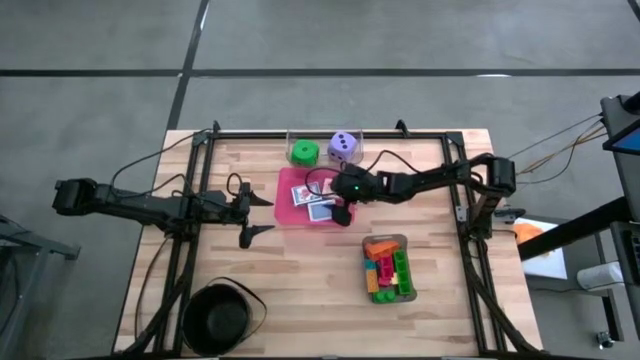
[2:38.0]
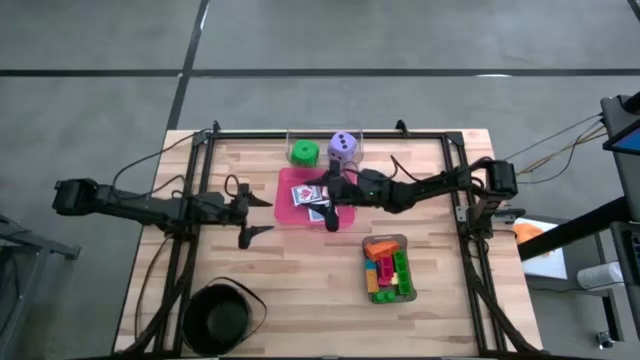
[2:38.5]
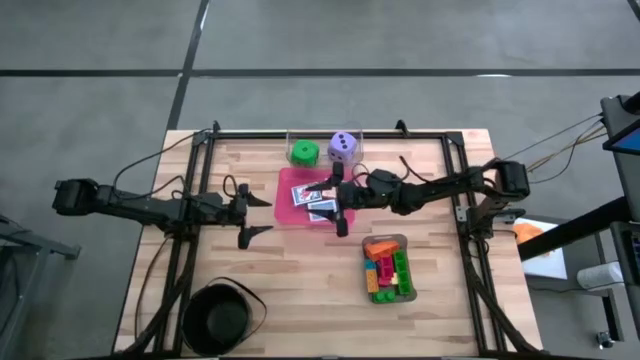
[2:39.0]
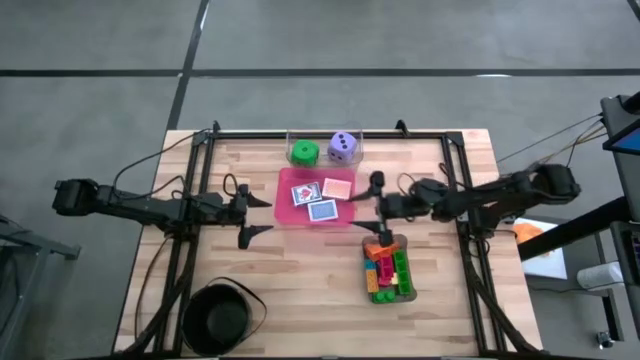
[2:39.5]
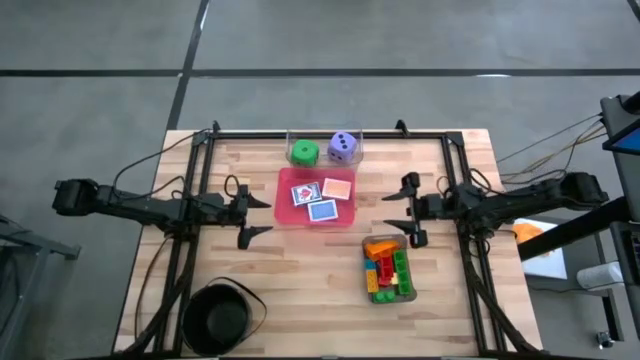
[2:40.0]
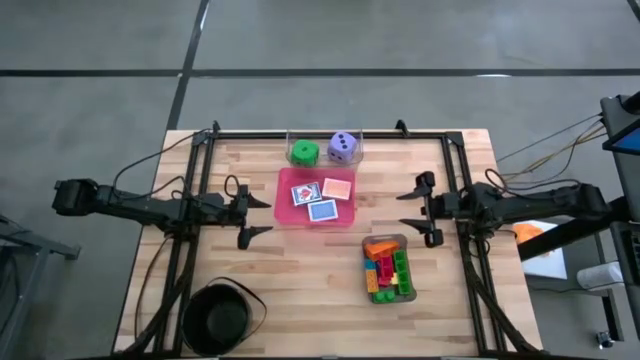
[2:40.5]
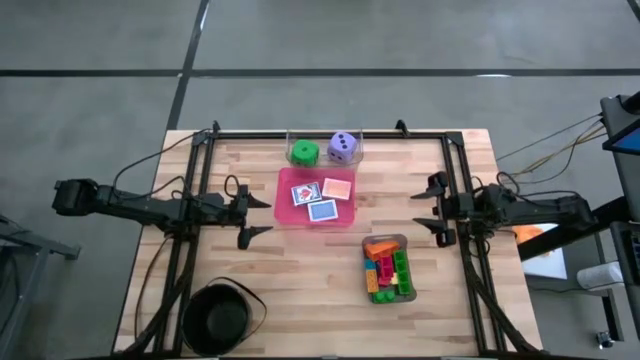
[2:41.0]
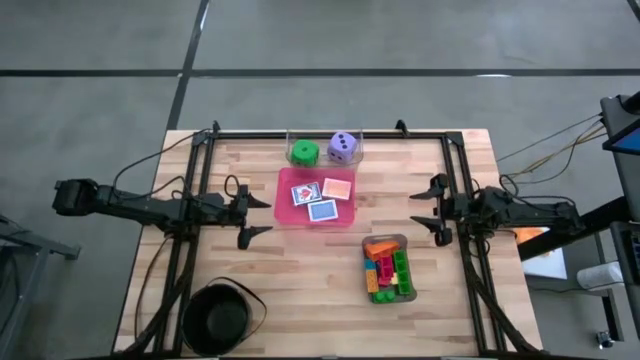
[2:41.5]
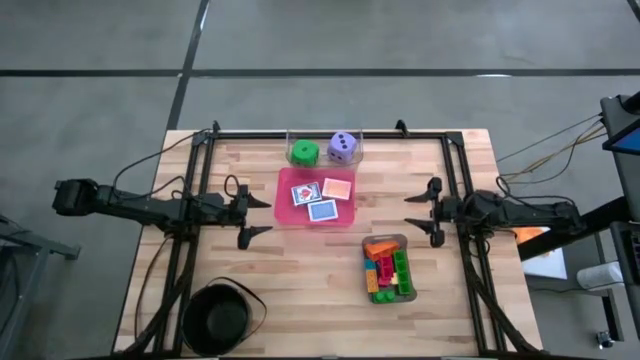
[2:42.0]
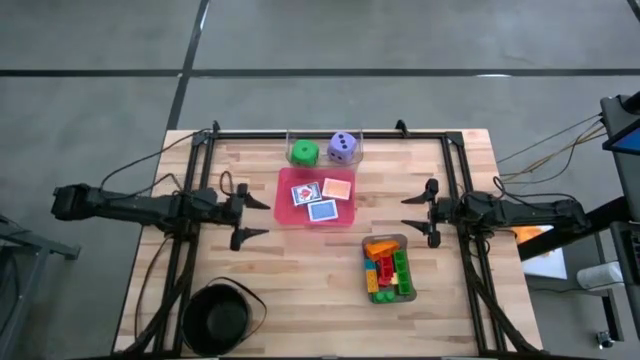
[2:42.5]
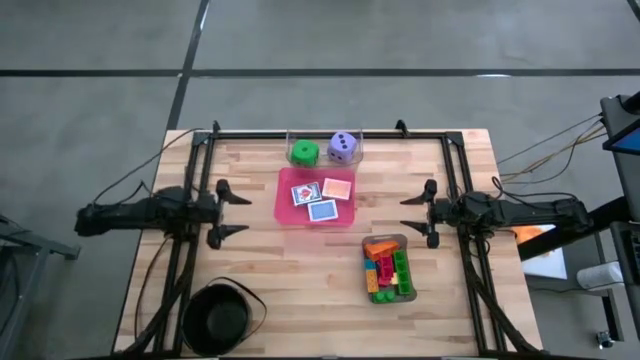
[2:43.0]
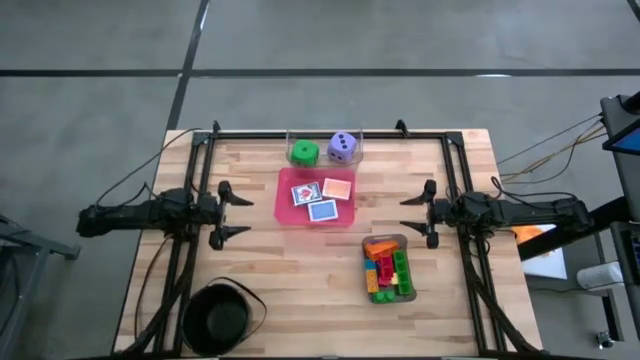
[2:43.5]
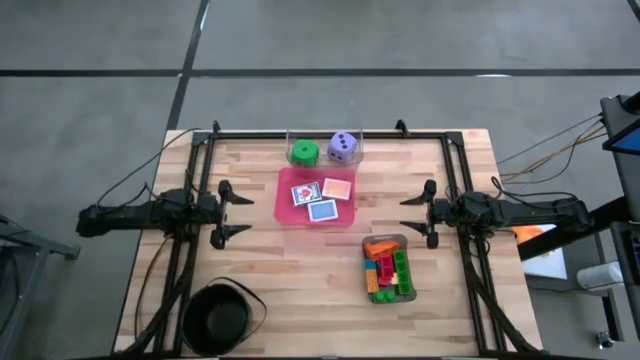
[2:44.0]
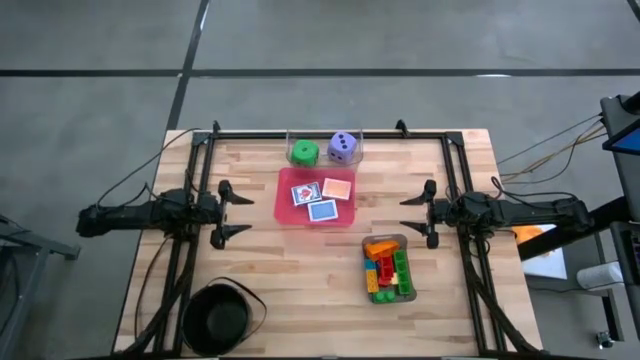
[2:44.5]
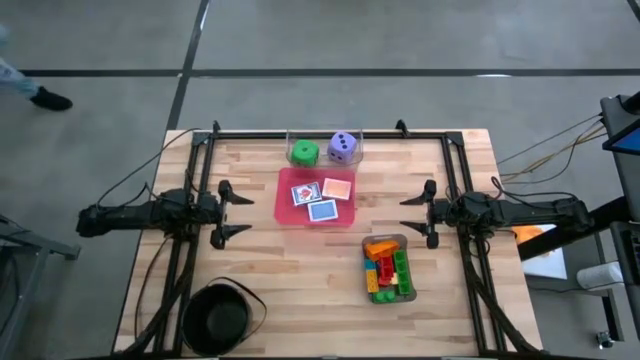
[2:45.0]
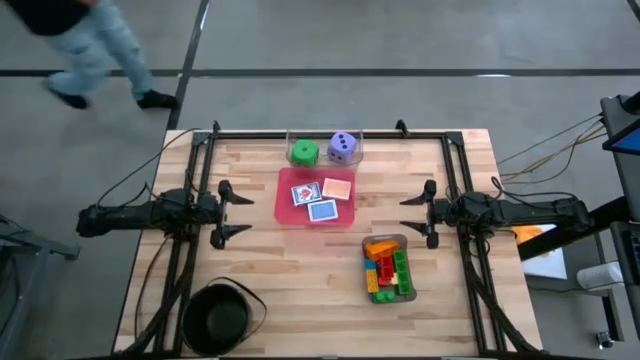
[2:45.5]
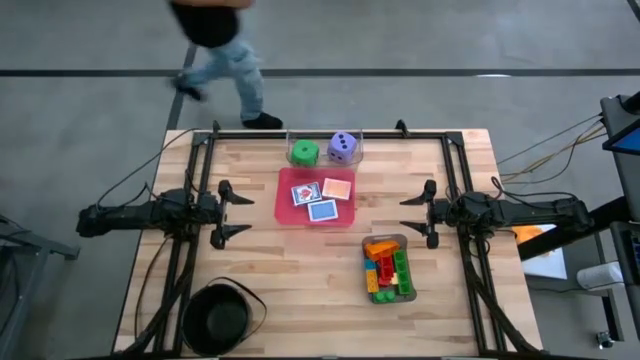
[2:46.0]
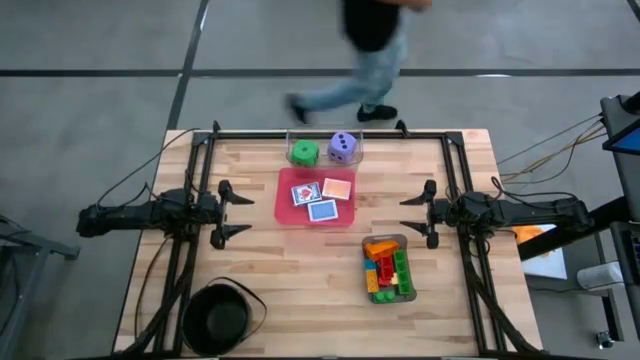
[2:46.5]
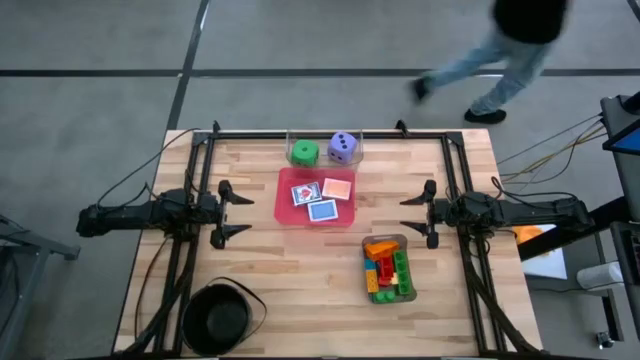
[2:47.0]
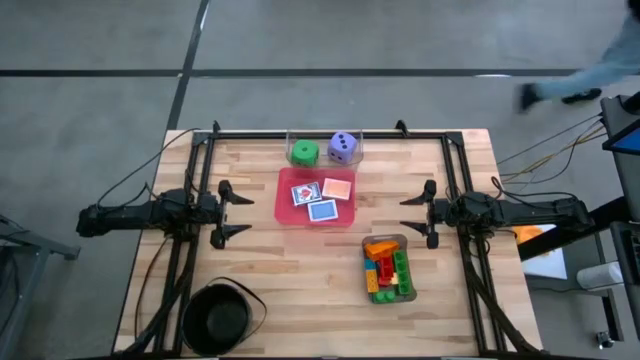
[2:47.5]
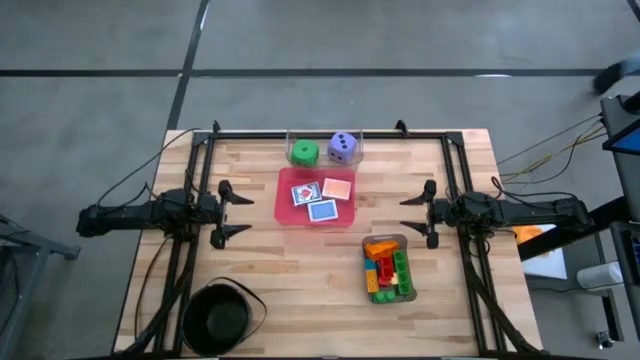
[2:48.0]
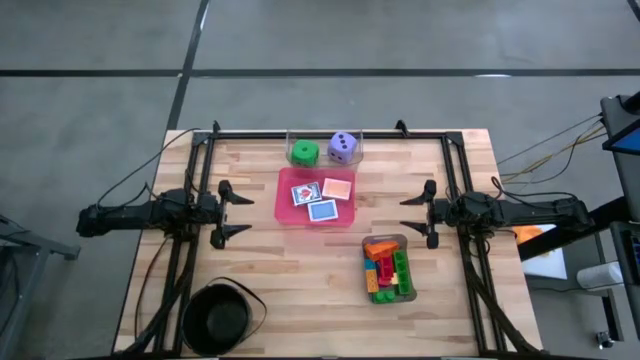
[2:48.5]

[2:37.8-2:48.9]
Task: Pick & Place Toys
Return to Home Position

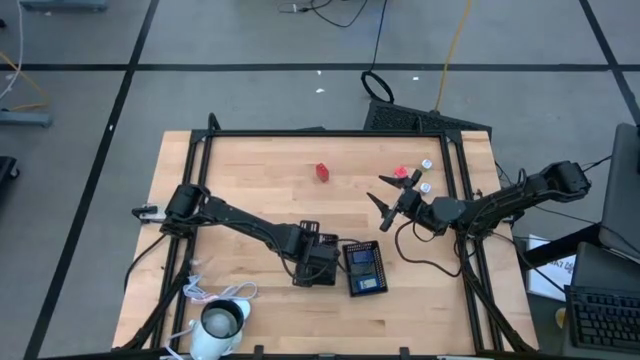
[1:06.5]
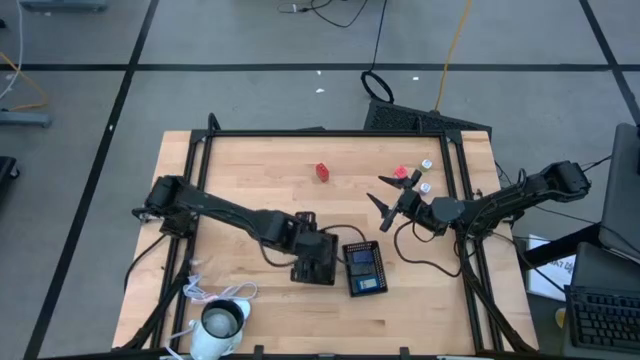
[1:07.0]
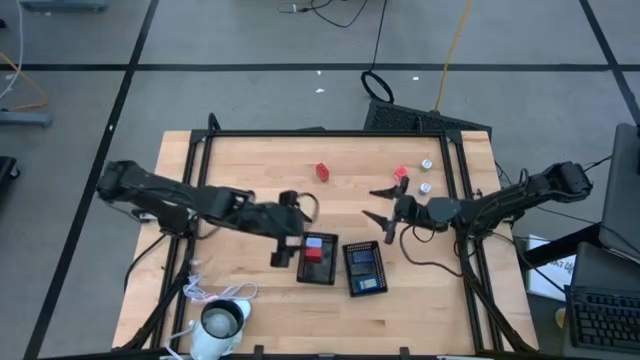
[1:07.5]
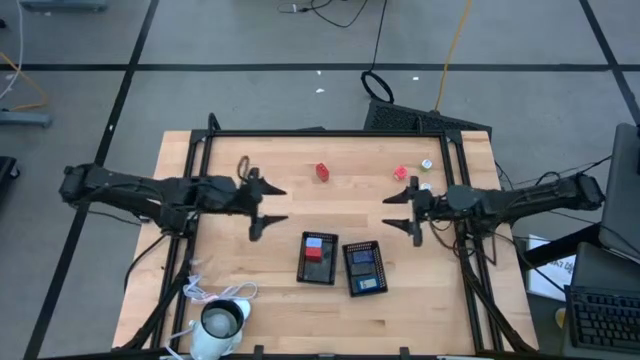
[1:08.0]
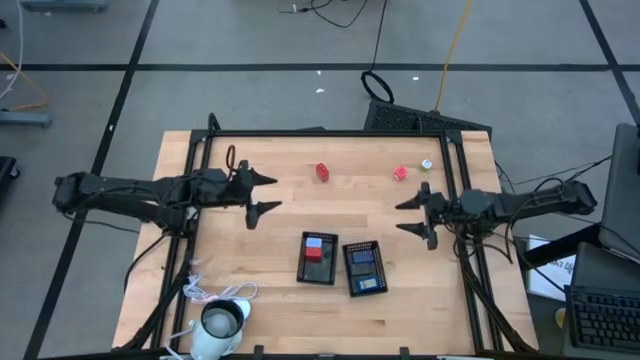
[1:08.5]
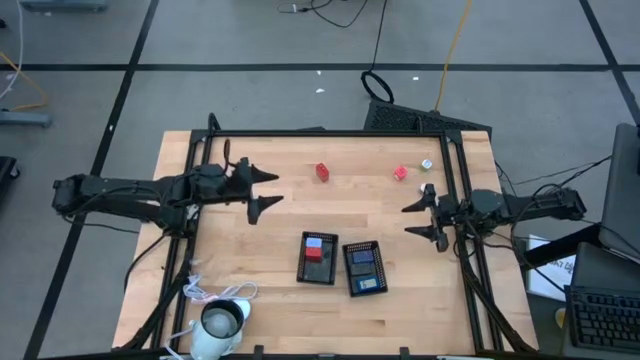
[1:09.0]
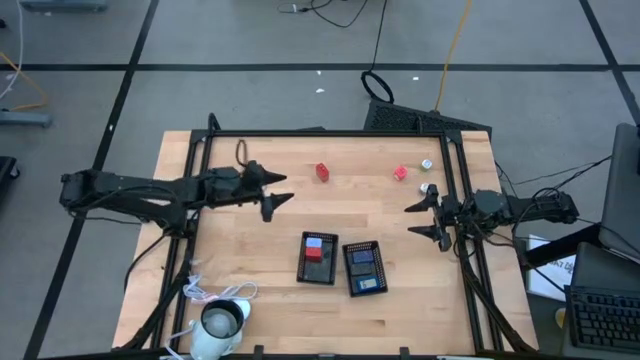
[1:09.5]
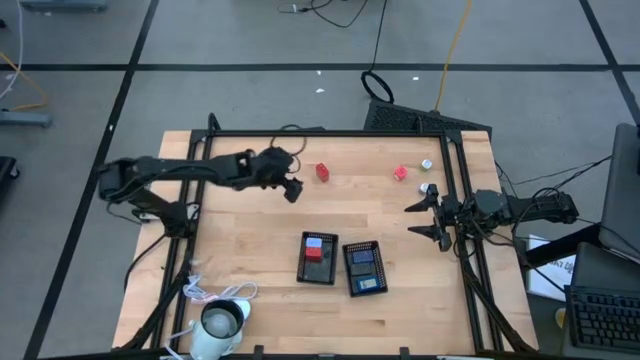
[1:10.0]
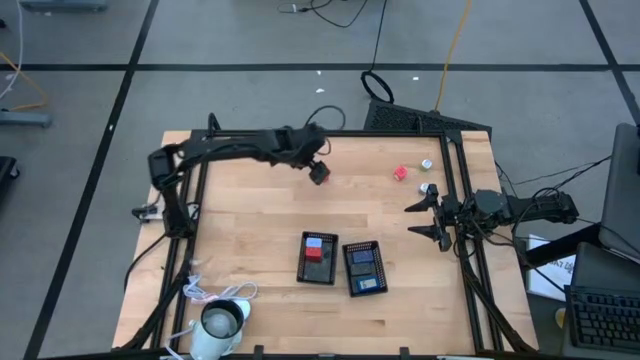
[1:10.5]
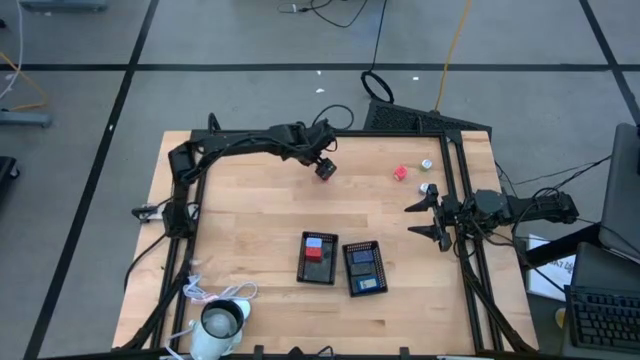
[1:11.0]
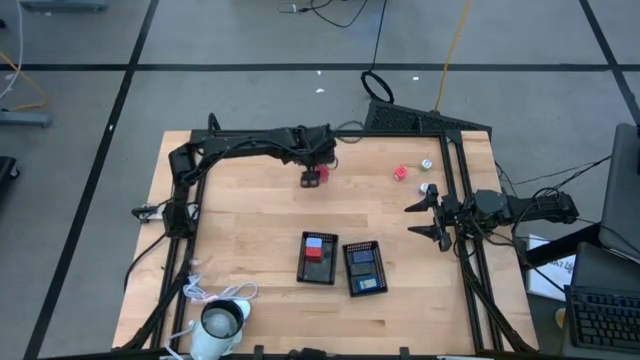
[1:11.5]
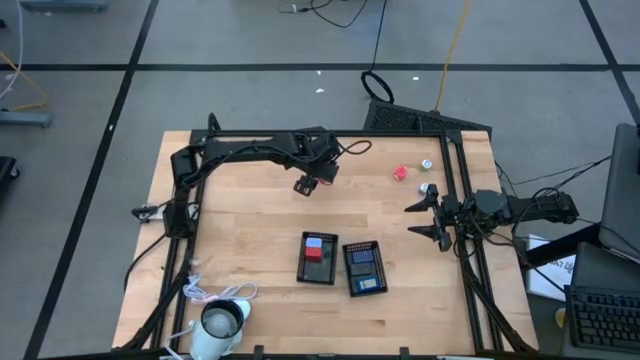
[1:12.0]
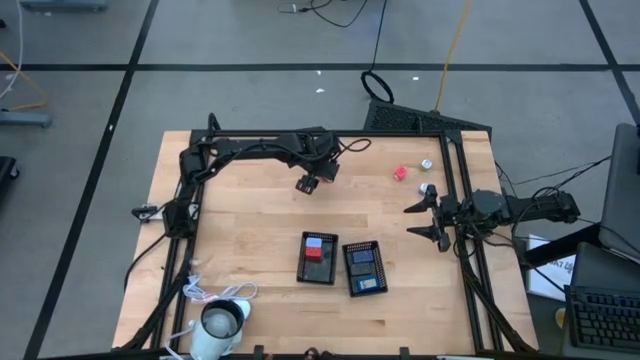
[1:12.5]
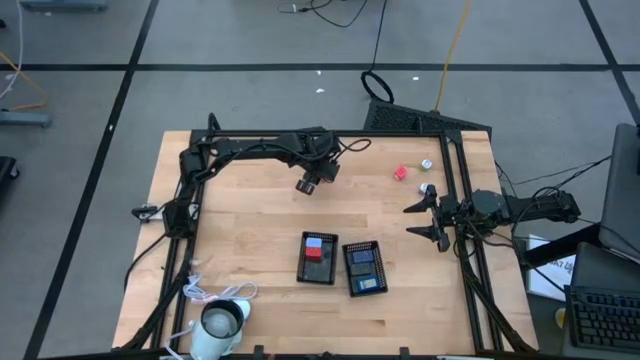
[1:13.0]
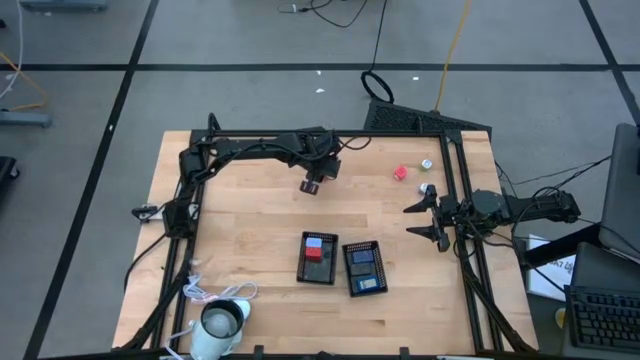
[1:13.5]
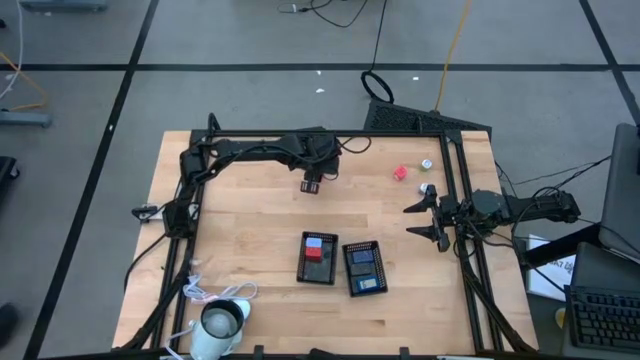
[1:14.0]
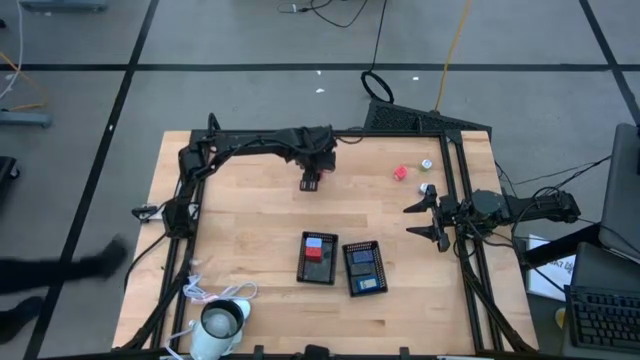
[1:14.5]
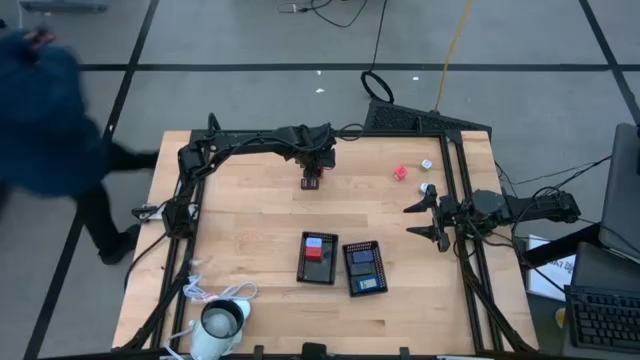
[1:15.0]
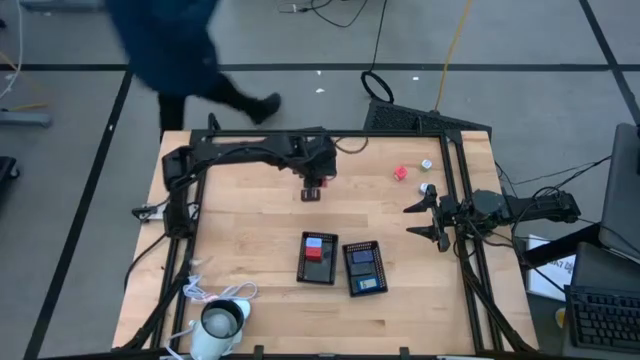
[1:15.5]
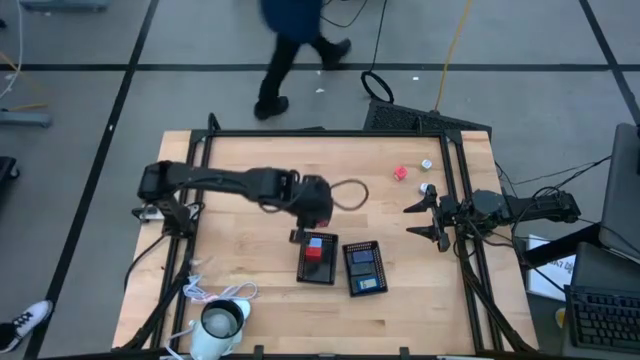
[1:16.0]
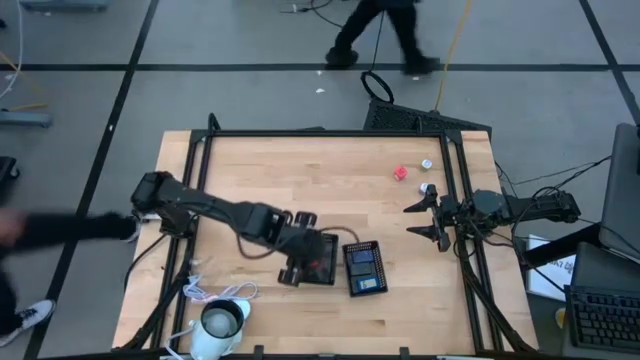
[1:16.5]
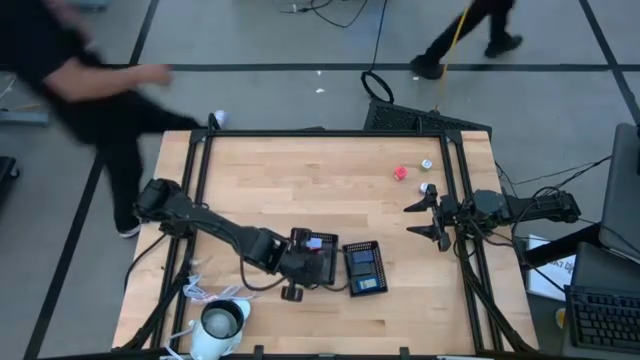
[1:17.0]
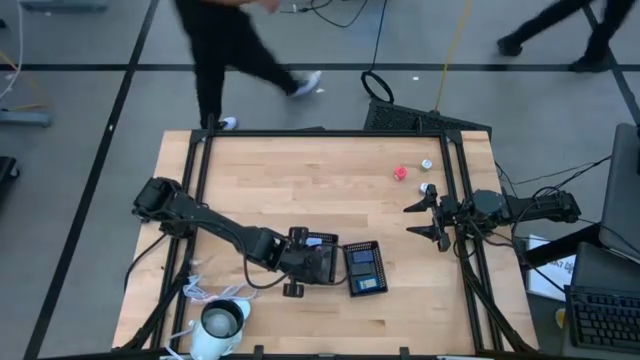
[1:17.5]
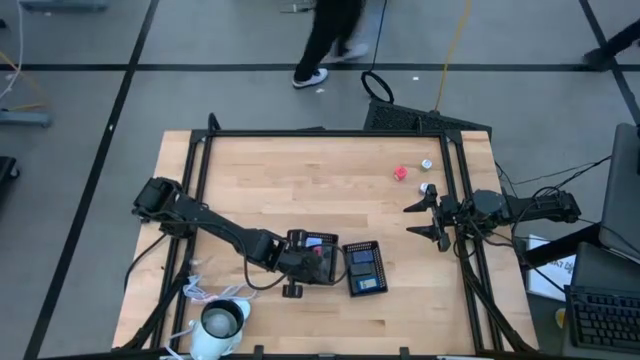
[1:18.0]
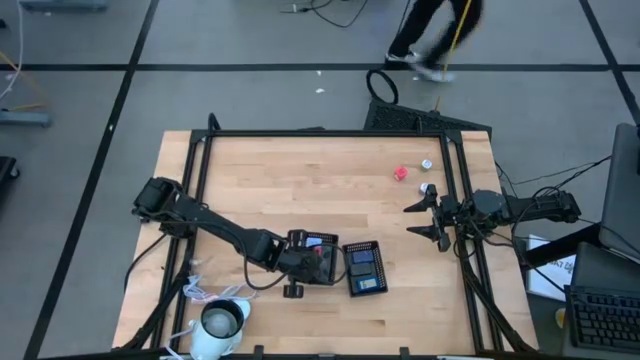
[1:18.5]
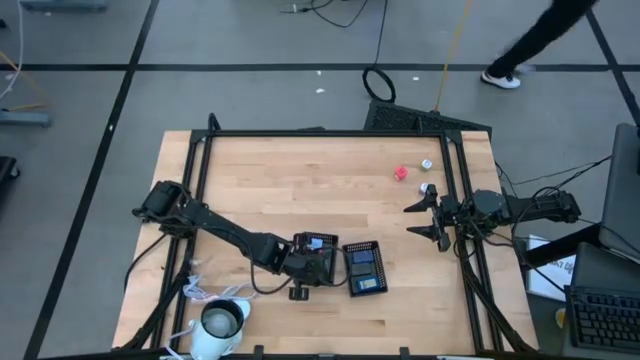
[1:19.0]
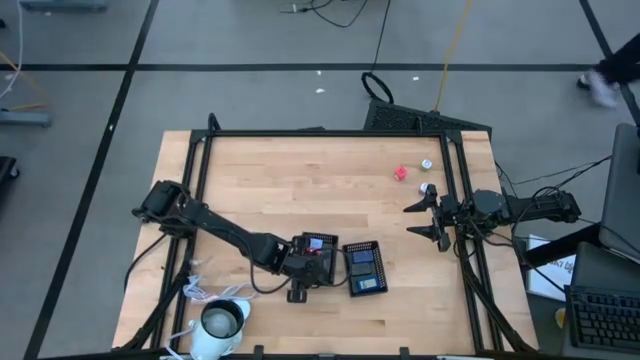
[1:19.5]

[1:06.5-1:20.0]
Task: Pick & Place Office items
Put the red charger adapter into the left black basket
